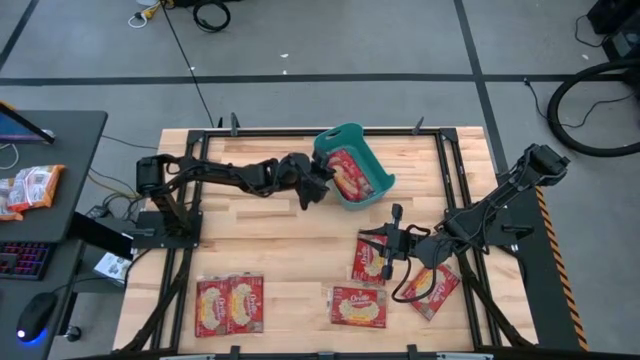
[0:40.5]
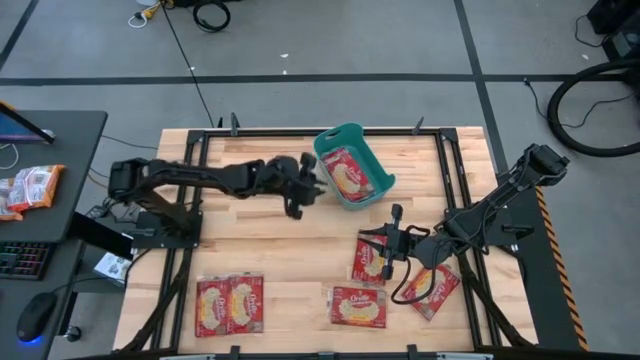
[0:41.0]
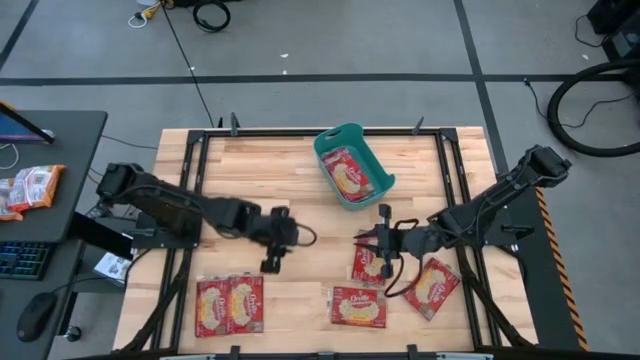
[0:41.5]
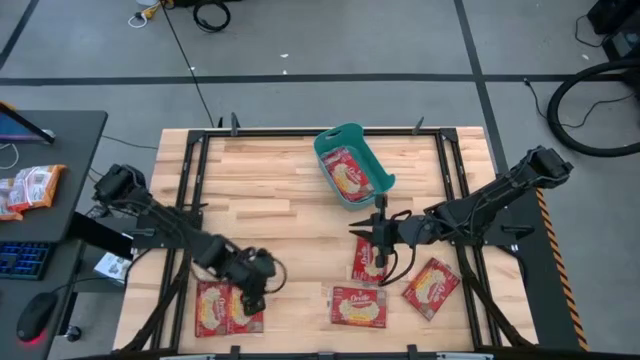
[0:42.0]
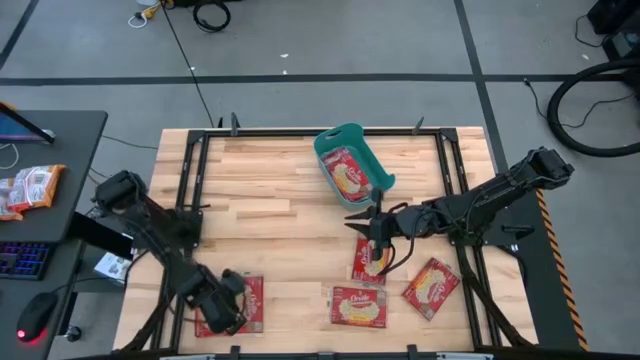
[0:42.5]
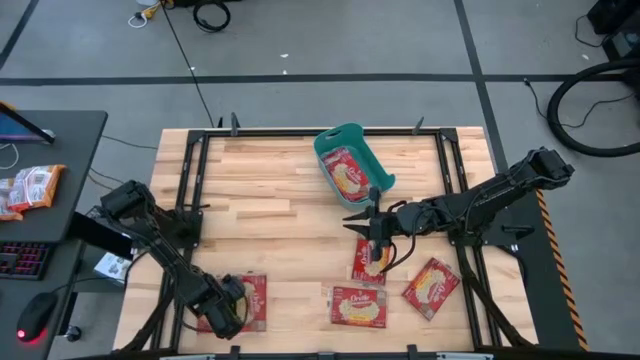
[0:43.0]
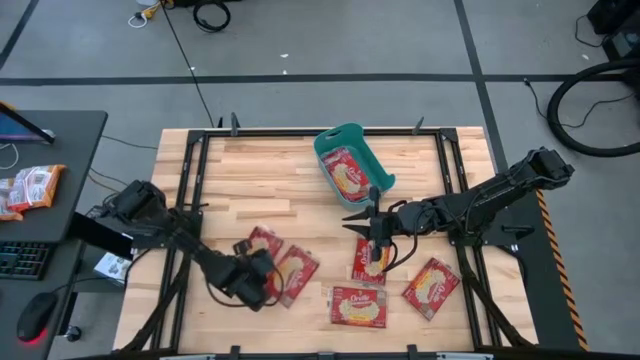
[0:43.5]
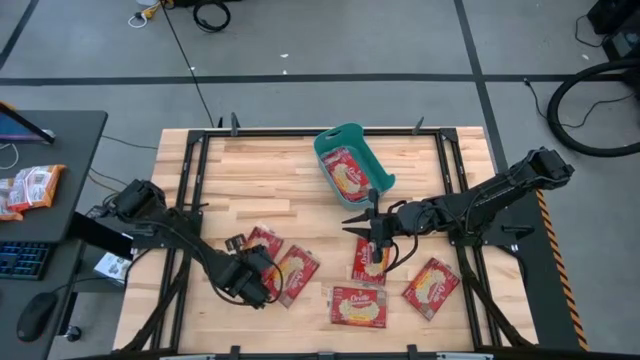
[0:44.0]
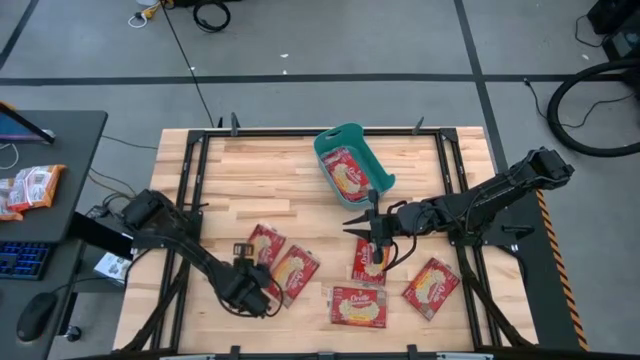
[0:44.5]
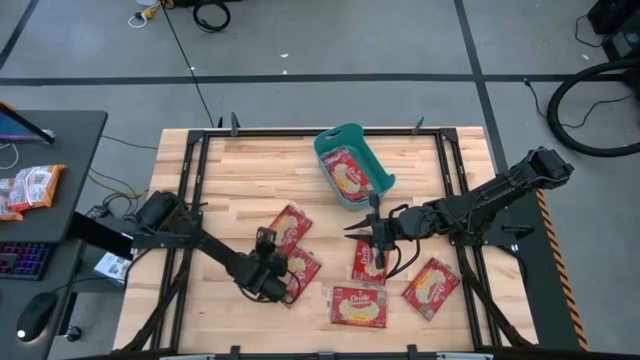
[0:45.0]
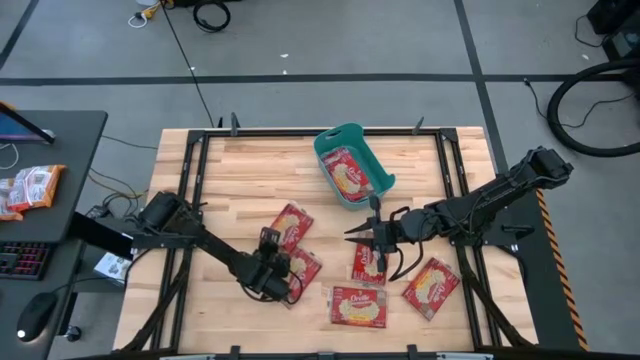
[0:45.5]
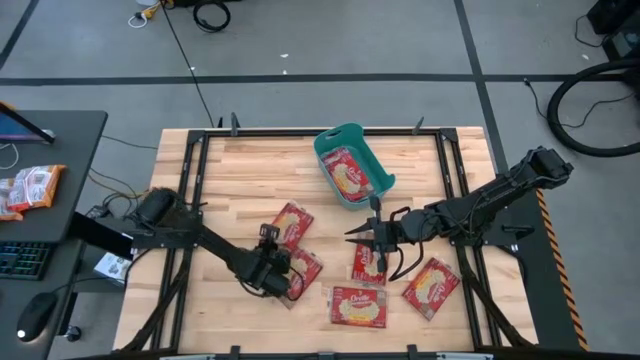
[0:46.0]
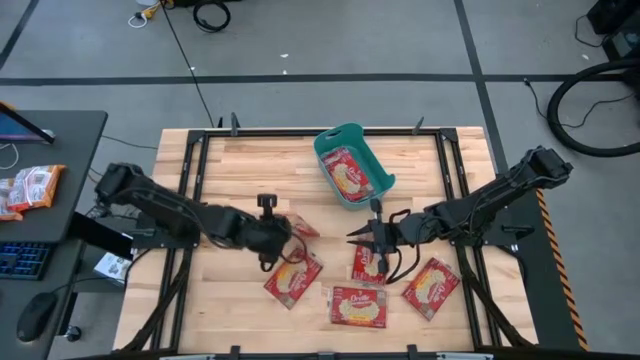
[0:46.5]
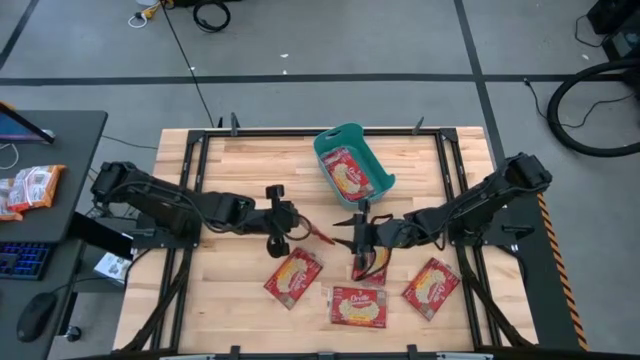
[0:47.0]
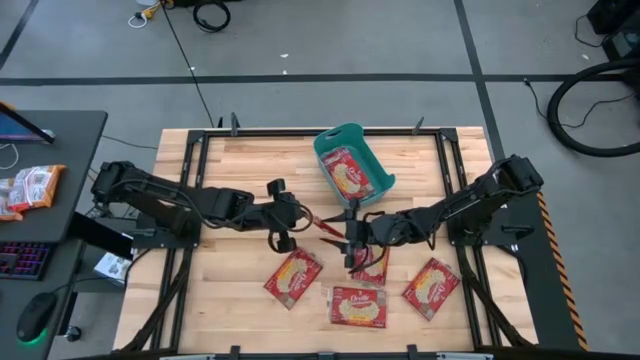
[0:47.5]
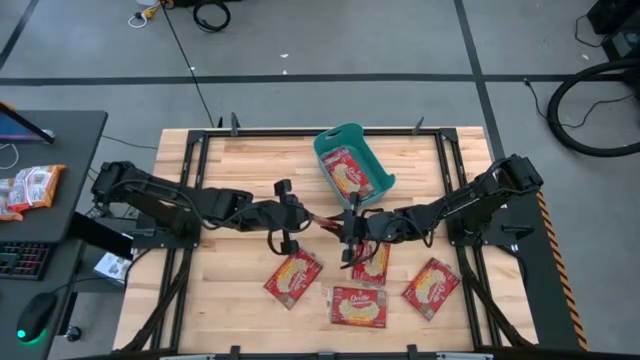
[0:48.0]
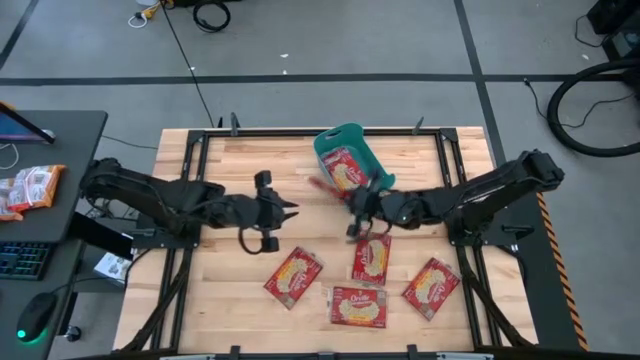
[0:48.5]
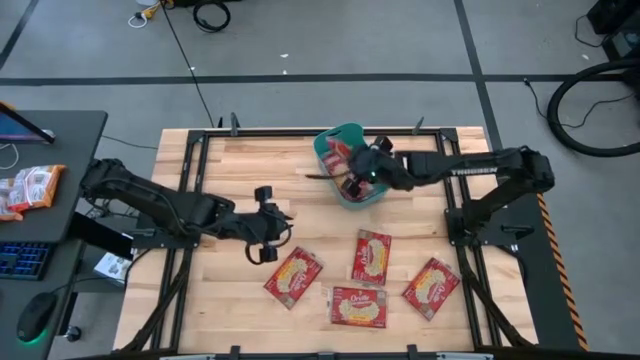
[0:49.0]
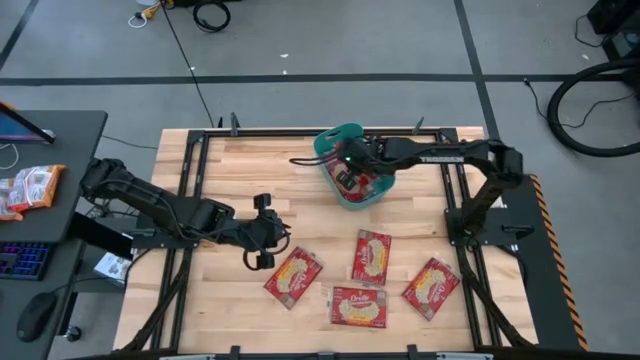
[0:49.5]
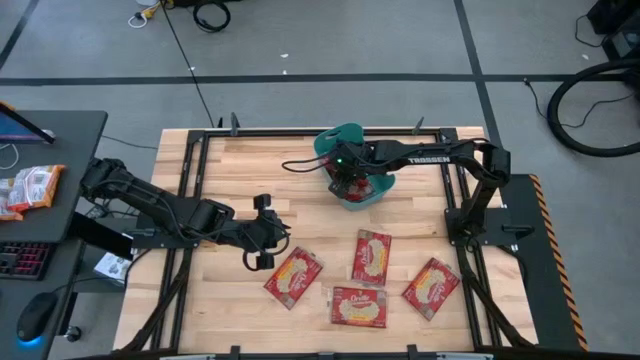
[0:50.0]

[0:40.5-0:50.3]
Task: Sort popcorn bags into baskets
Put the red popcorn bag into the green bin

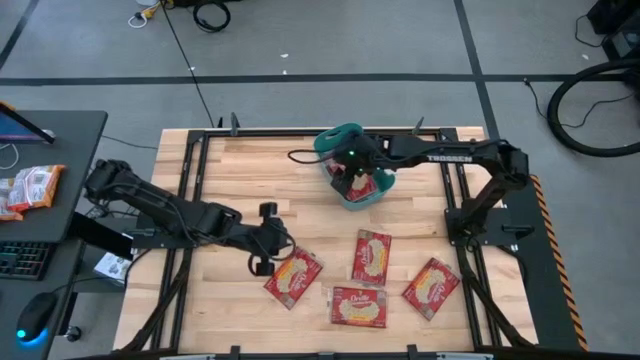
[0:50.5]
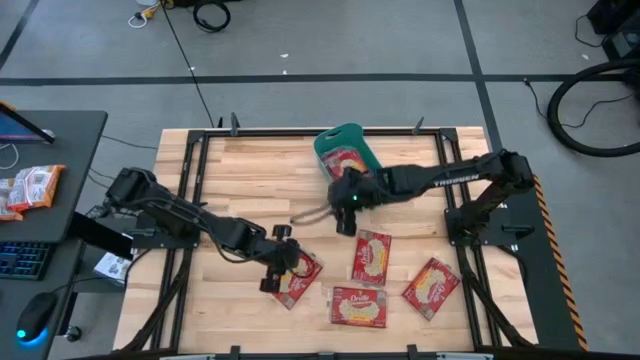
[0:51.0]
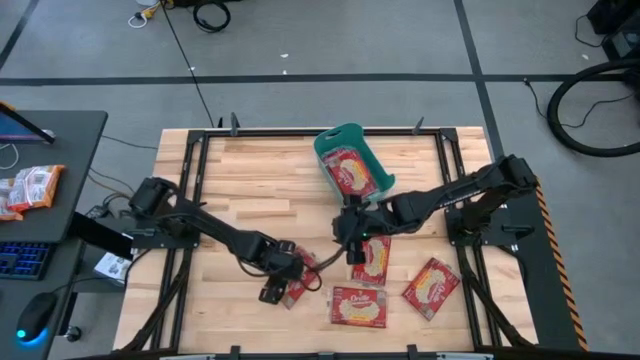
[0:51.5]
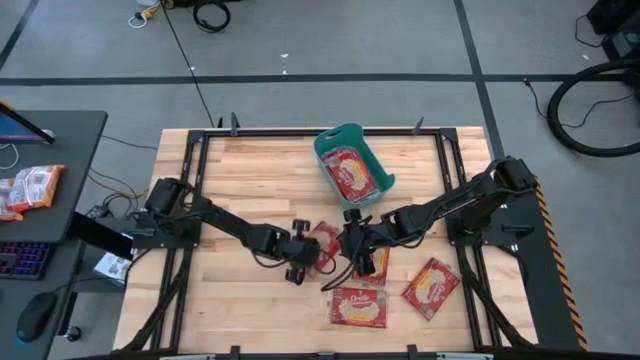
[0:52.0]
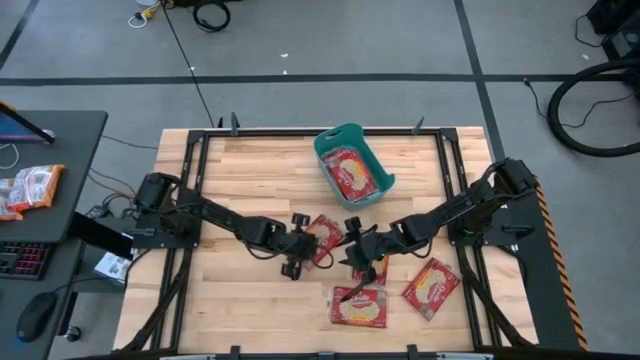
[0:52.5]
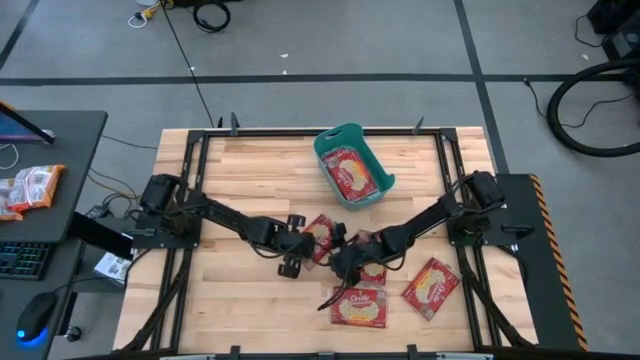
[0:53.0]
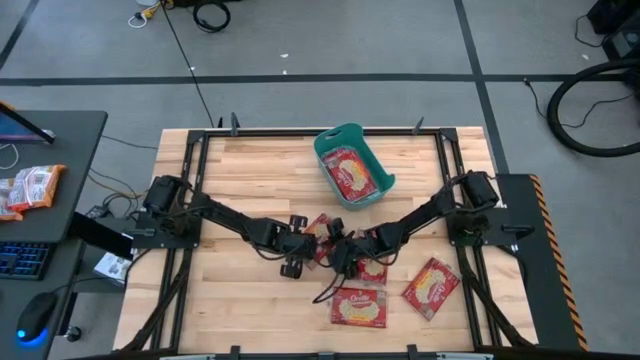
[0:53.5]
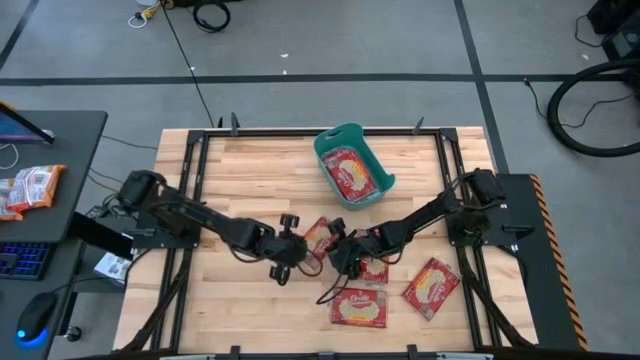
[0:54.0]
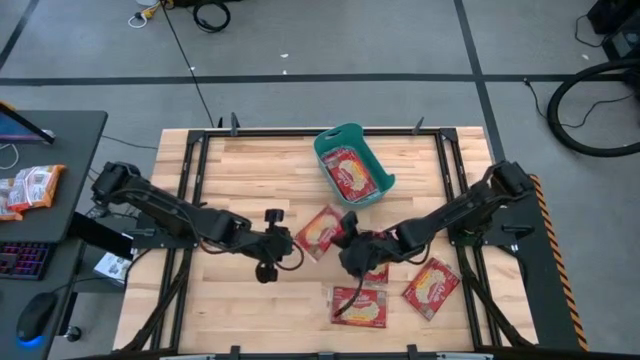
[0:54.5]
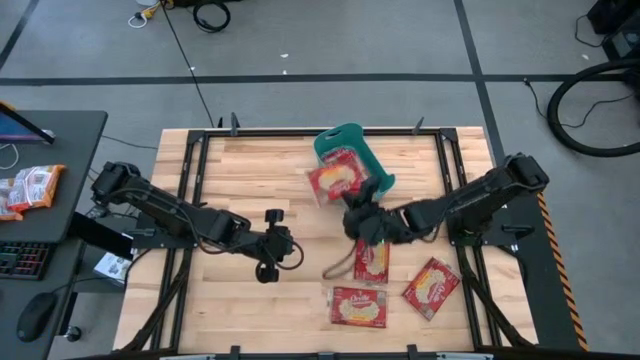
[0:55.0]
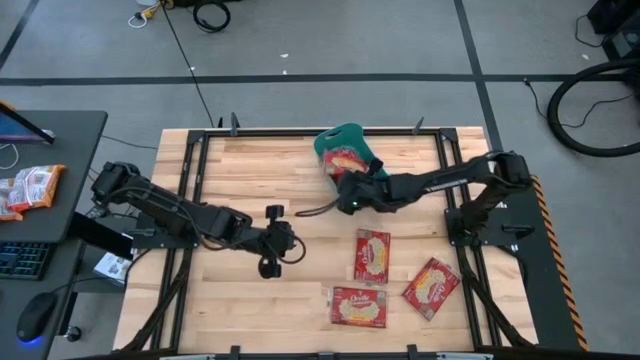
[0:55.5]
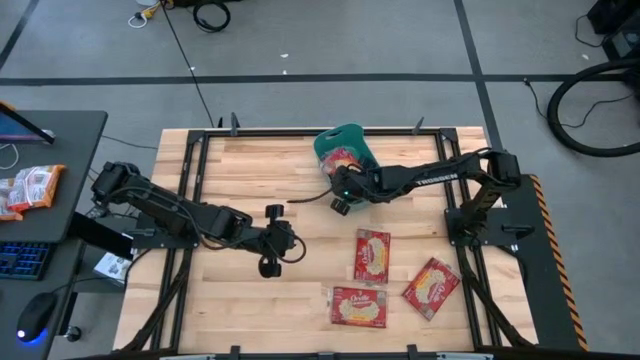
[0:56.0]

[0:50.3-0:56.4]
Put the red popcorn bag into the green bin

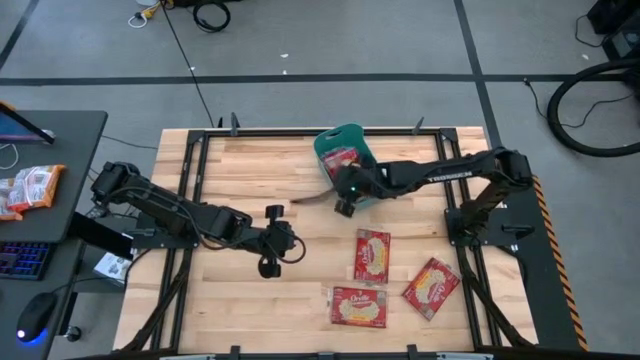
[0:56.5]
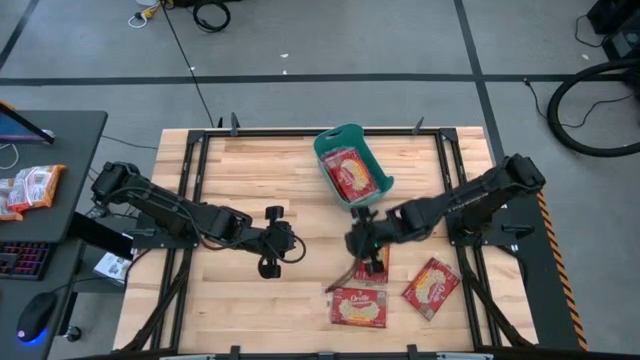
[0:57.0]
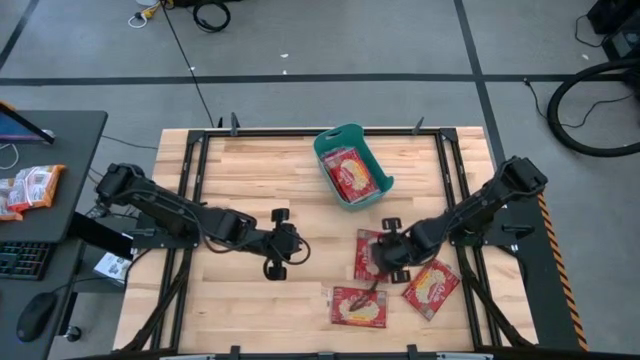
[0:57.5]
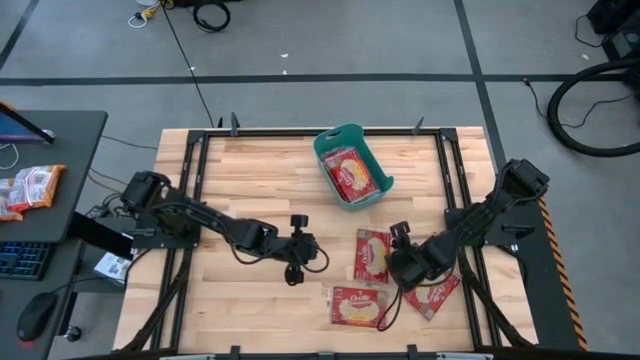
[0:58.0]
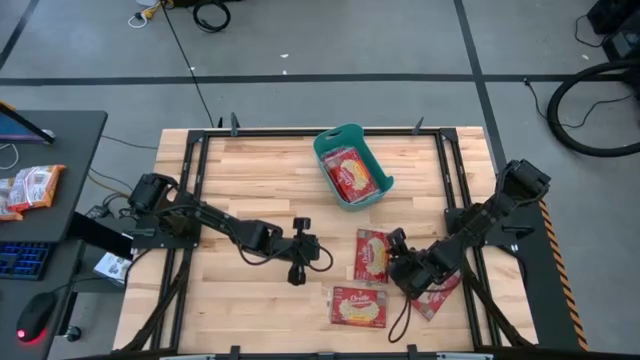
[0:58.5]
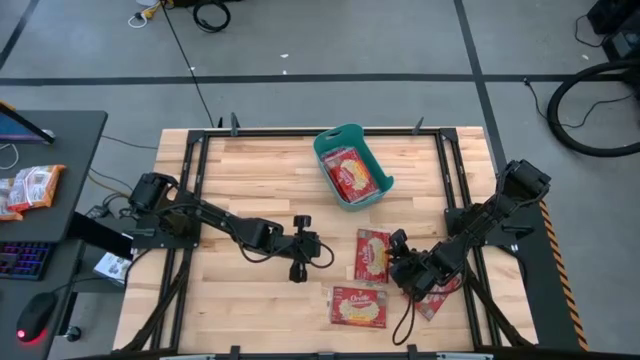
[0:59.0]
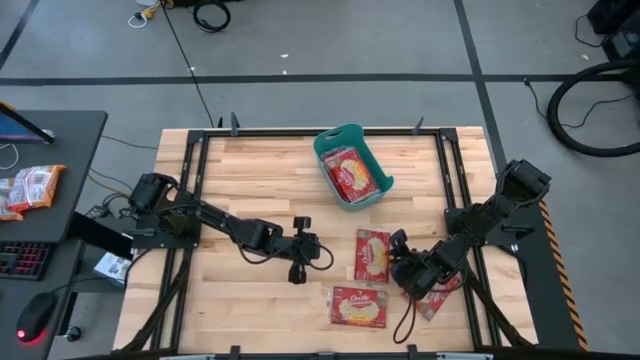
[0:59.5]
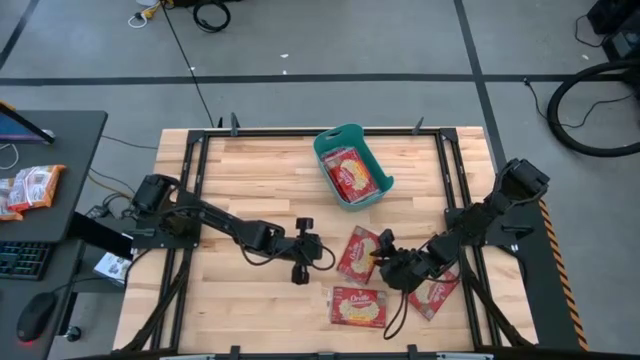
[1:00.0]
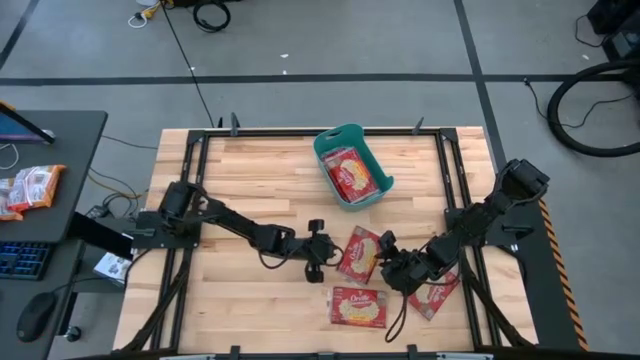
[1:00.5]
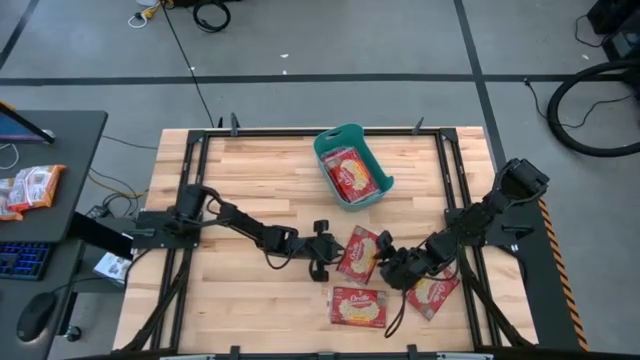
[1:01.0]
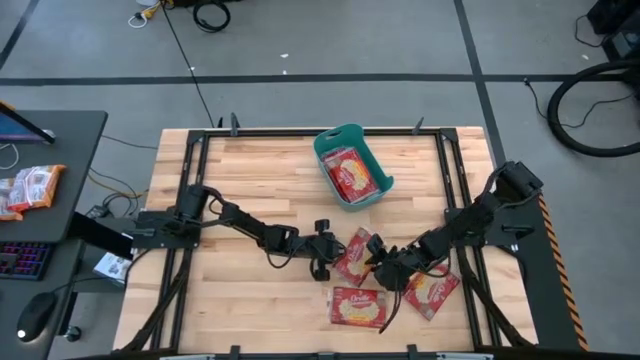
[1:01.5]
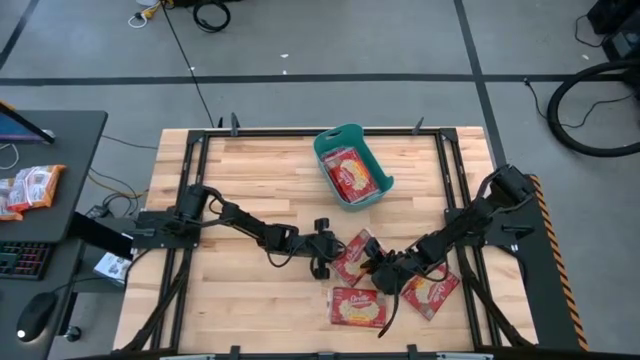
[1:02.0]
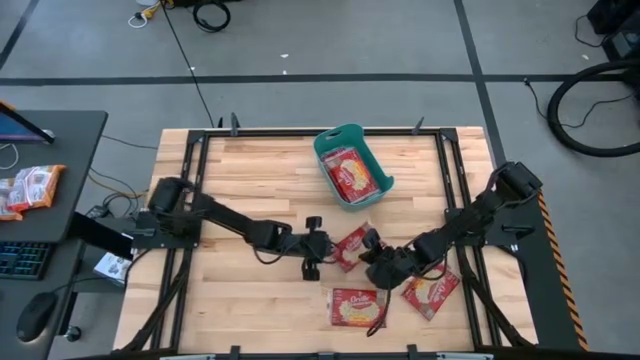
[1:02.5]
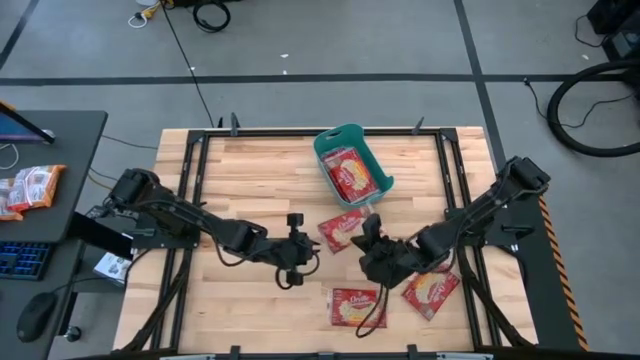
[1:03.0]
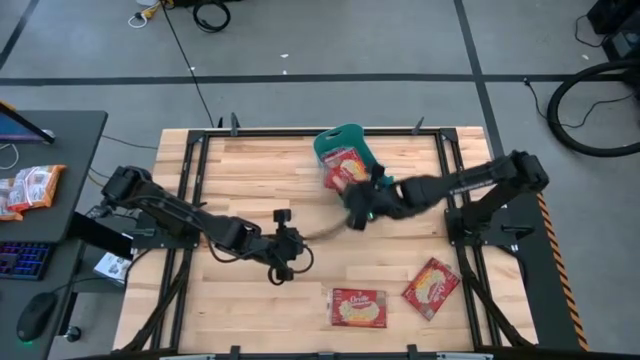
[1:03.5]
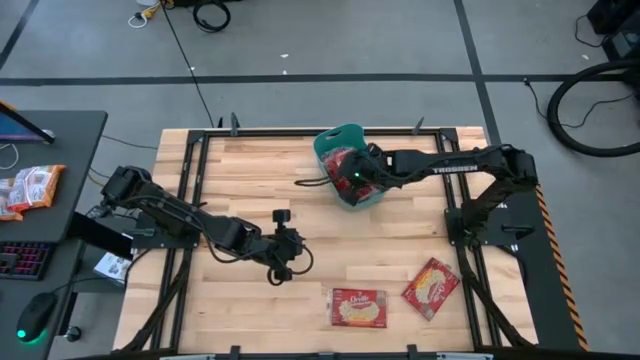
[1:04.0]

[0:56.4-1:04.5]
Put the red popcorn bag into the green bin
